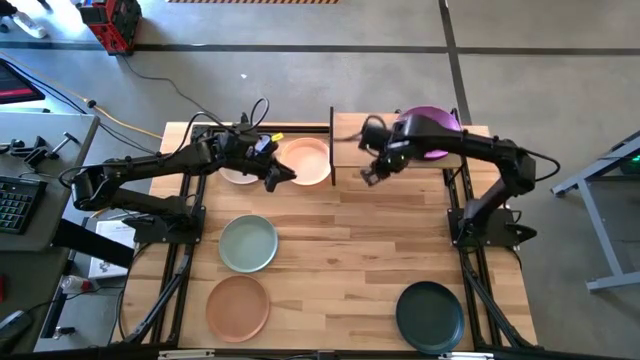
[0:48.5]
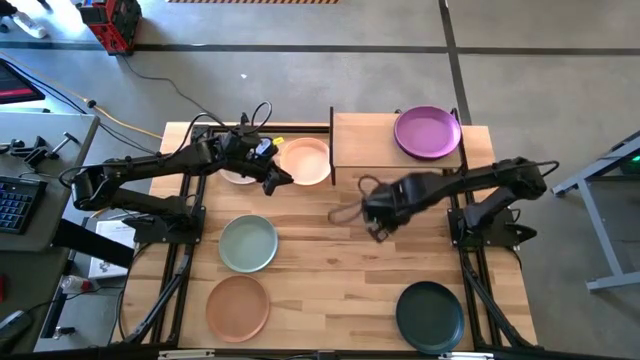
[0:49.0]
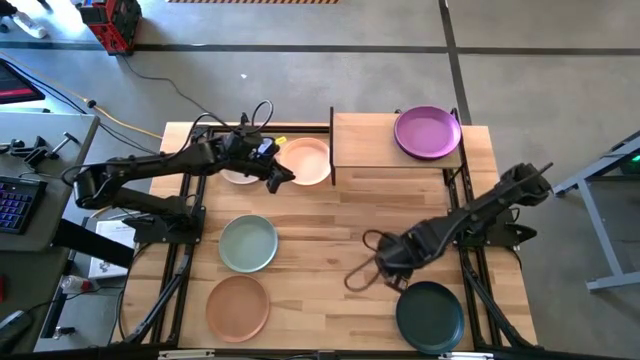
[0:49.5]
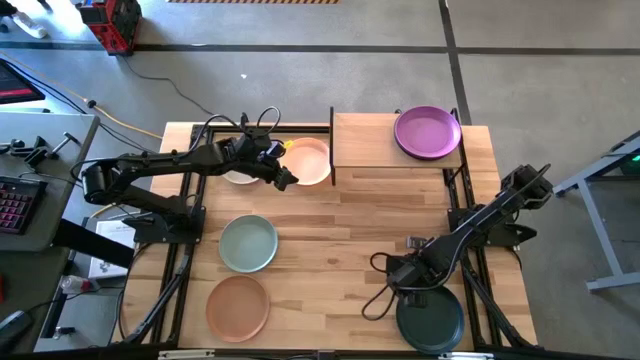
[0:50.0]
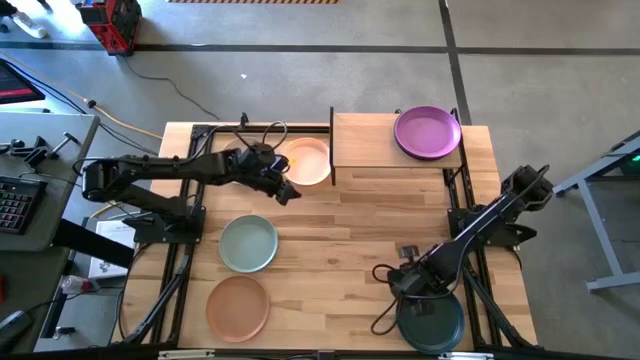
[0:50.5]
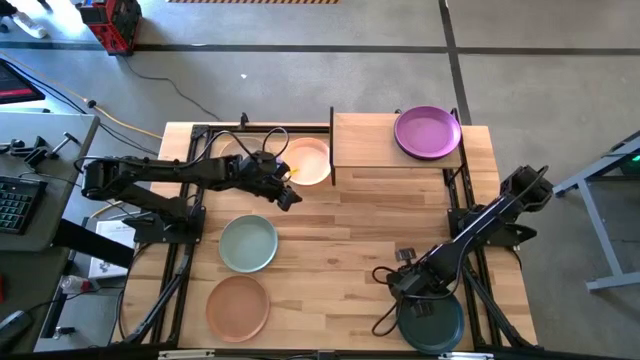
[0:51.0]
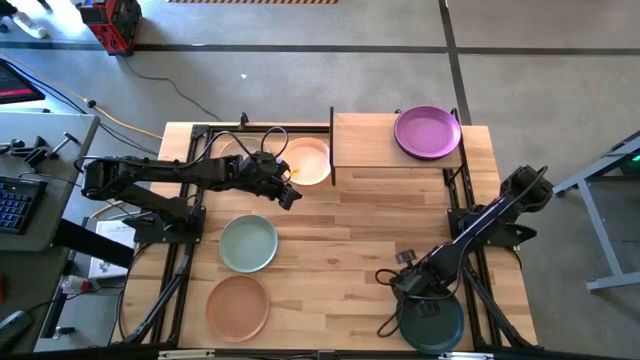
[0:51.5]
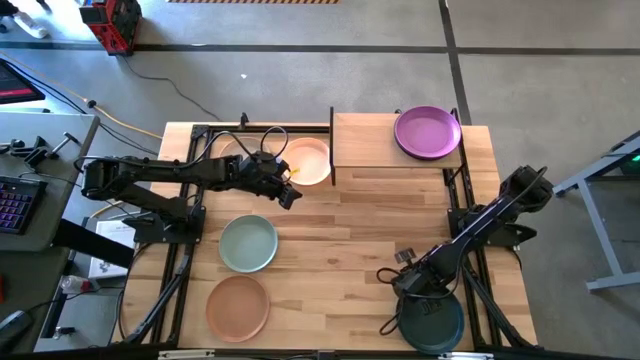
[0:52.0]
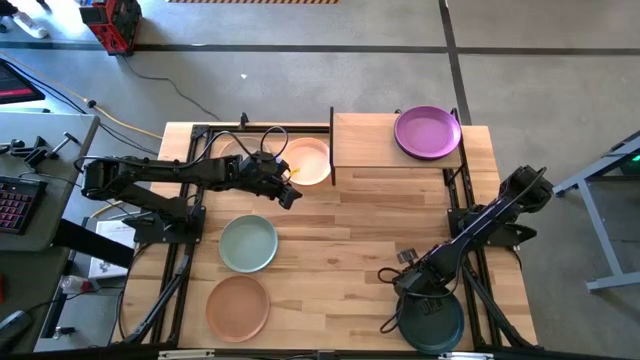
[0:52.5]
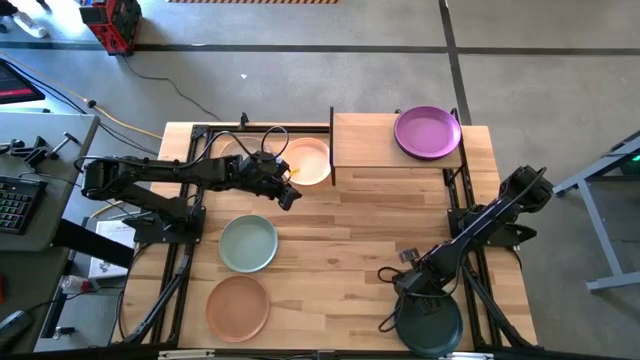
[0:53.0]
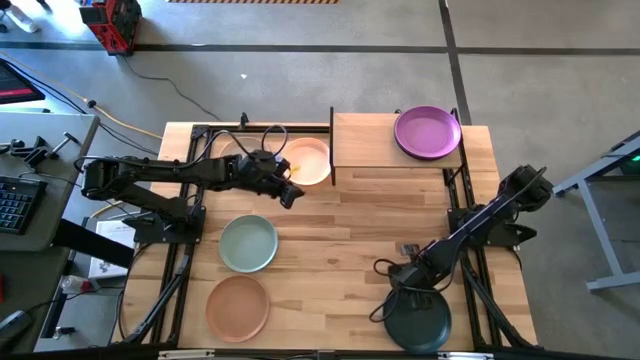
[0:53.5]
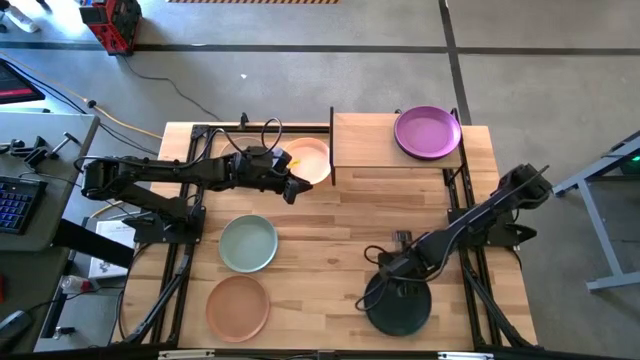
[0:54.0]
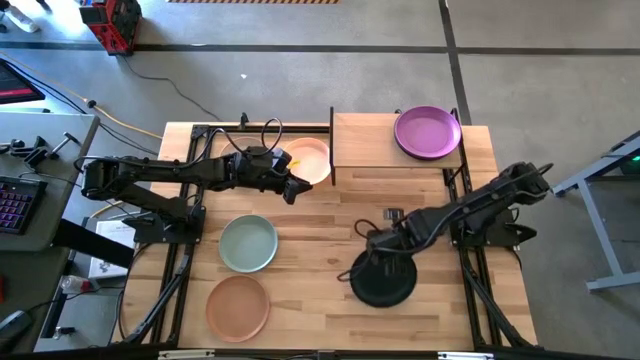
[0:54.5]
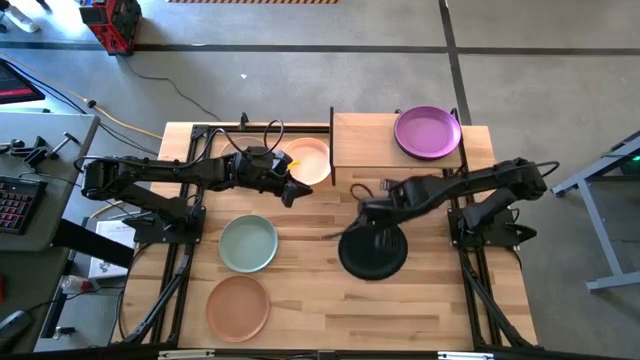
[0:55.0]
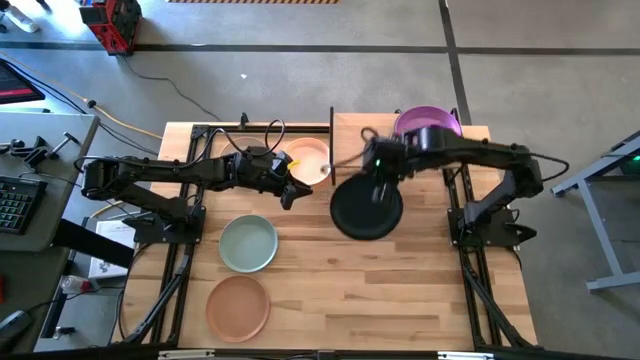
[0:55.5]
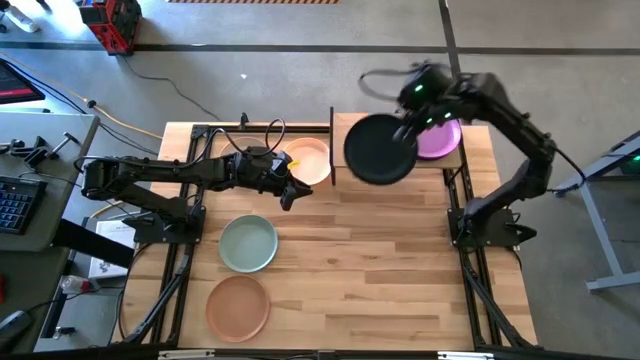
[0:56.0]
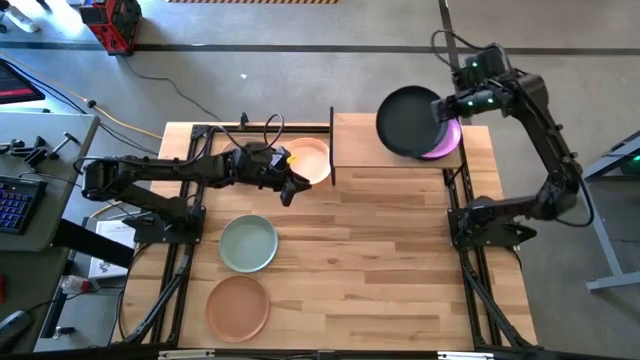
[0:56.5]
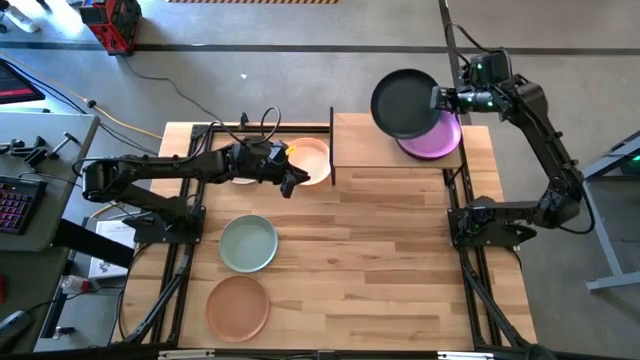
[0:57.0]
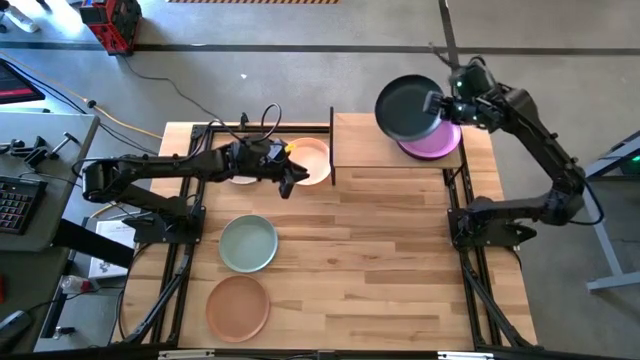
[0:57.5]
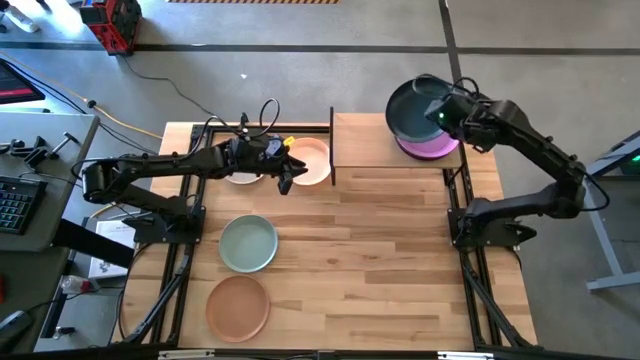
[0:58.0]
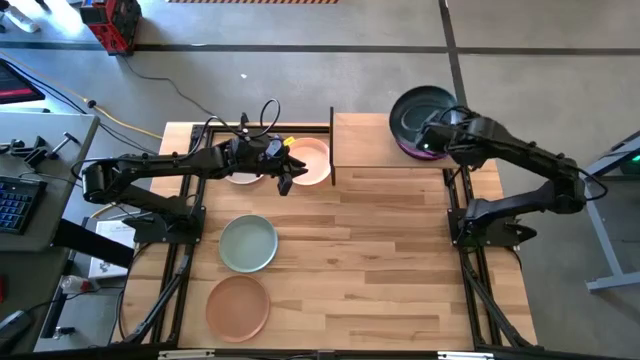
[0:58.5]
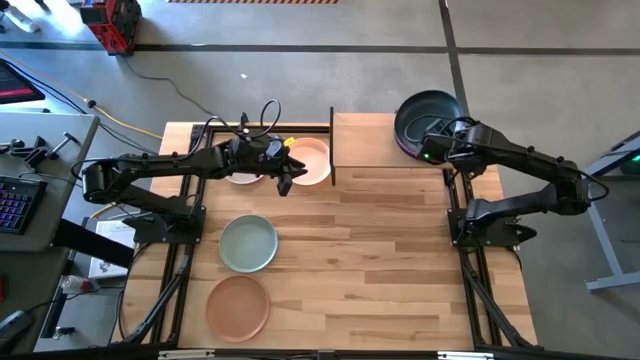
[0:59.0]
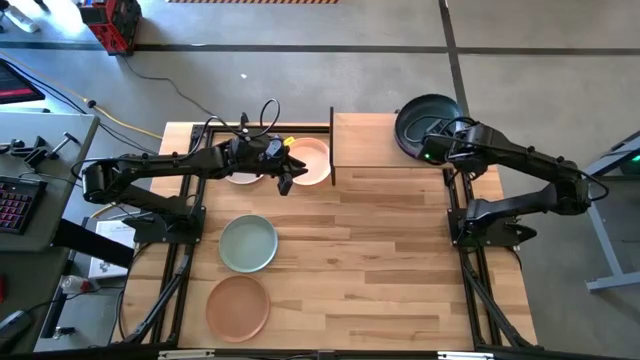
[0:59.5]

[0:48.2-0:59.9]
Task: Place and stack plates onto a shelf
Stack the black plate on top of the violet plate on the shelf

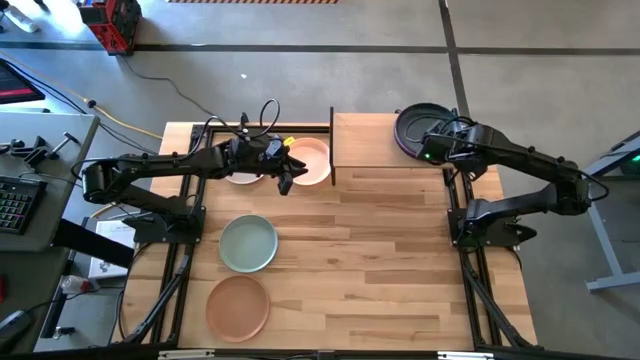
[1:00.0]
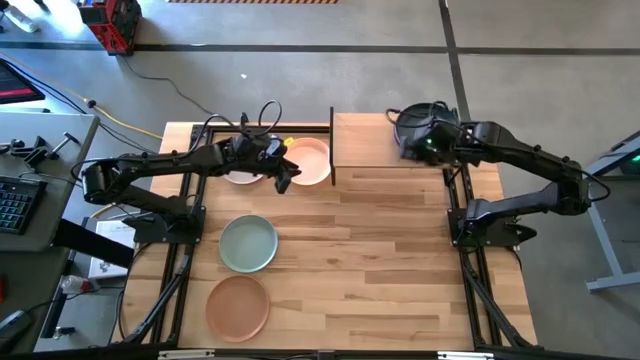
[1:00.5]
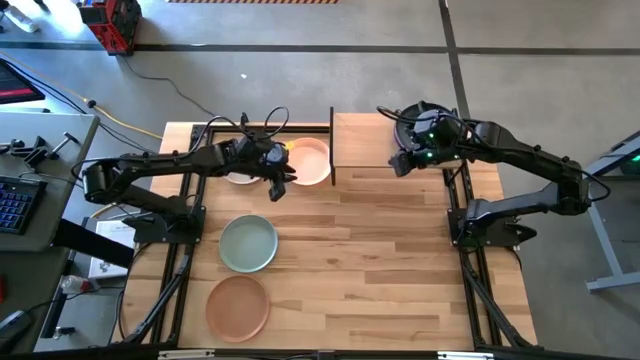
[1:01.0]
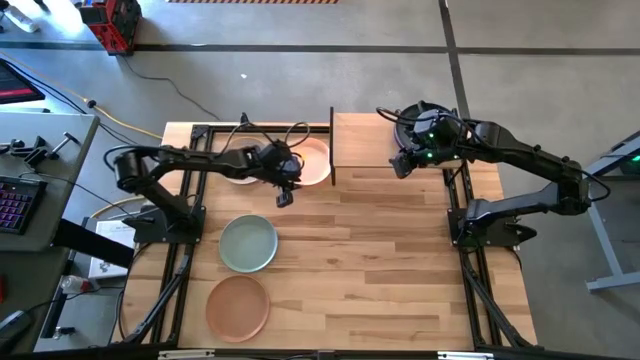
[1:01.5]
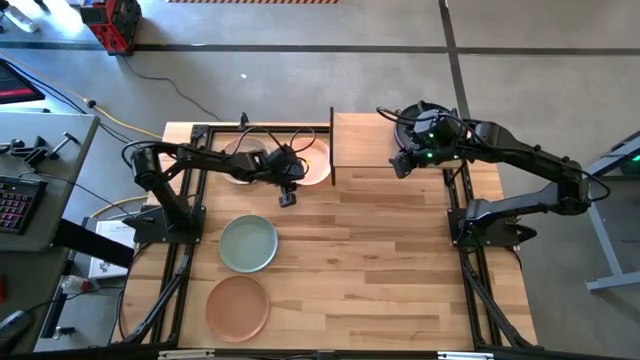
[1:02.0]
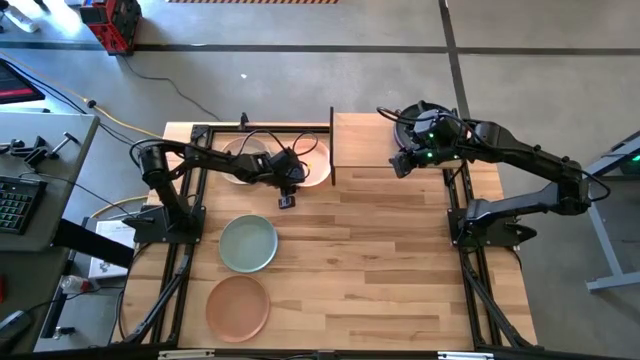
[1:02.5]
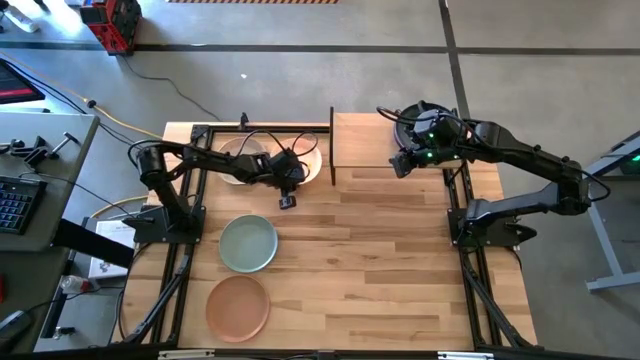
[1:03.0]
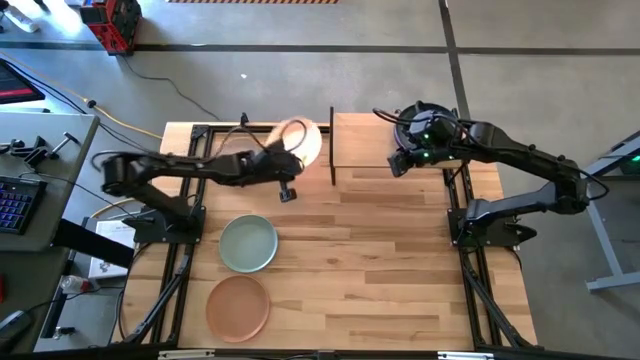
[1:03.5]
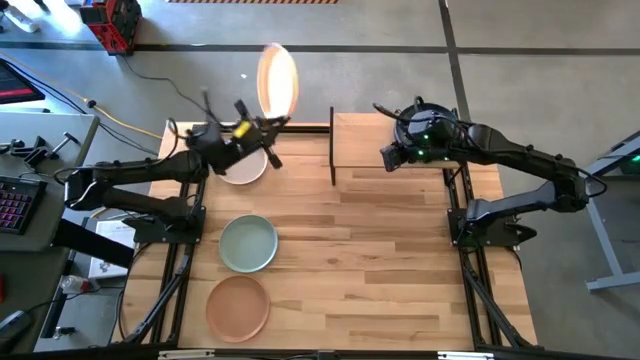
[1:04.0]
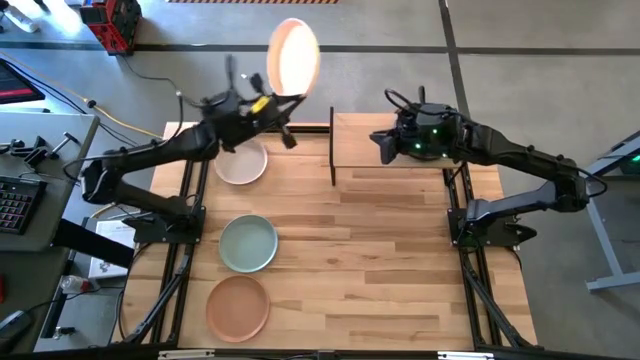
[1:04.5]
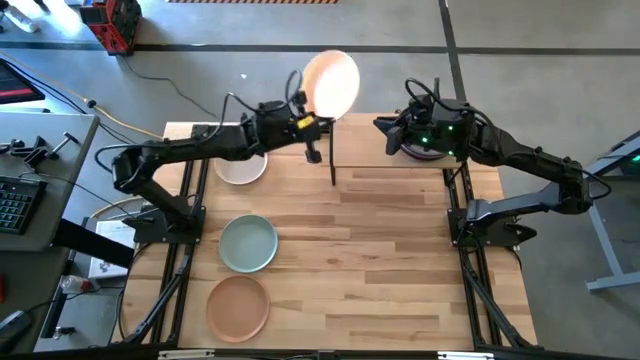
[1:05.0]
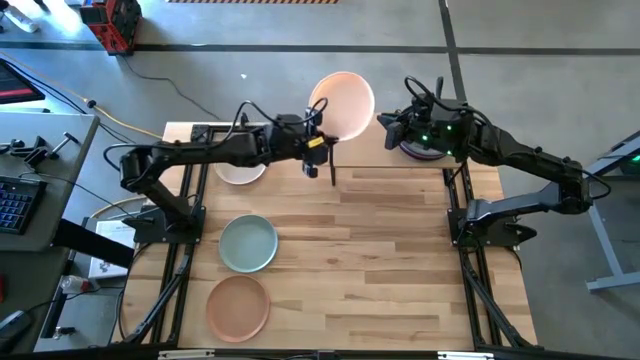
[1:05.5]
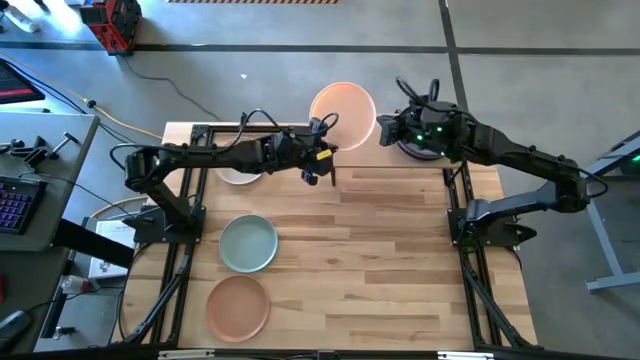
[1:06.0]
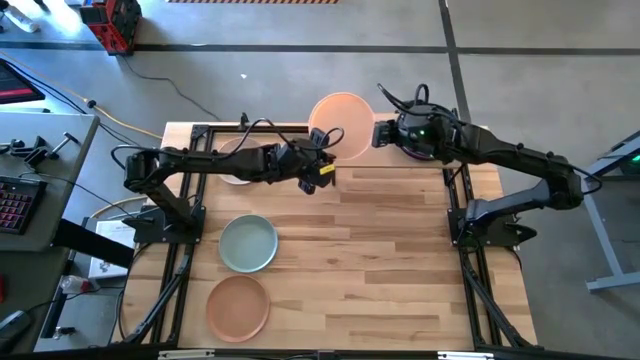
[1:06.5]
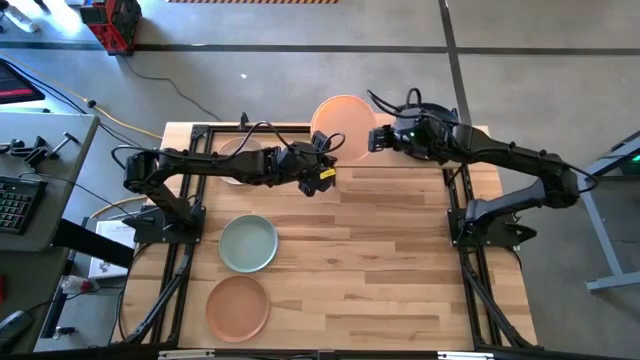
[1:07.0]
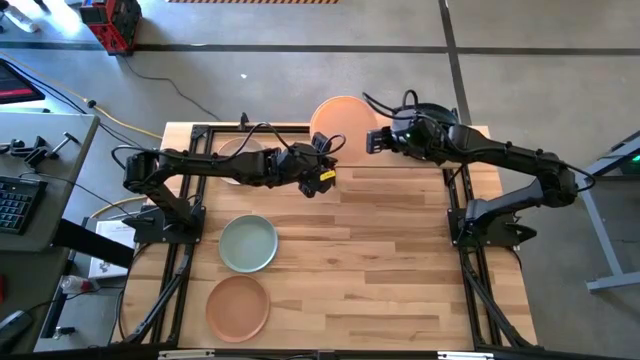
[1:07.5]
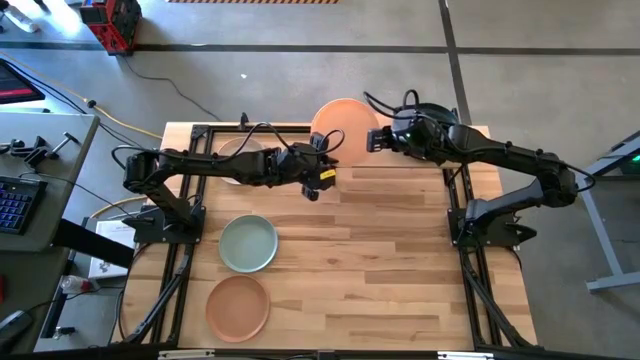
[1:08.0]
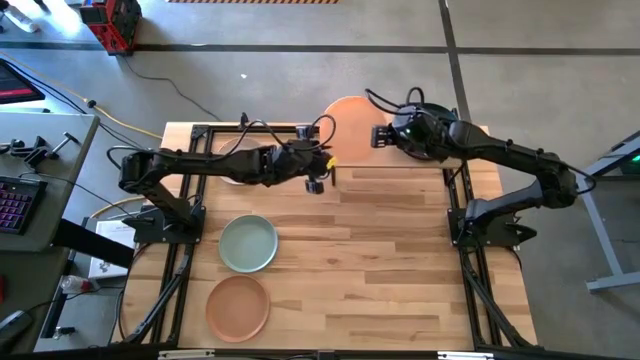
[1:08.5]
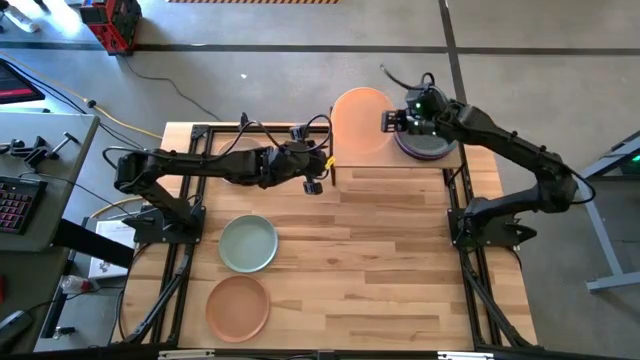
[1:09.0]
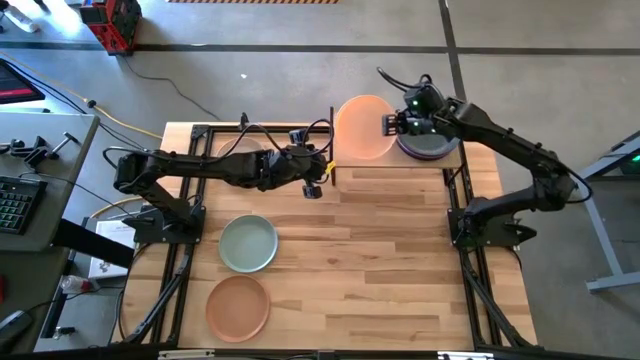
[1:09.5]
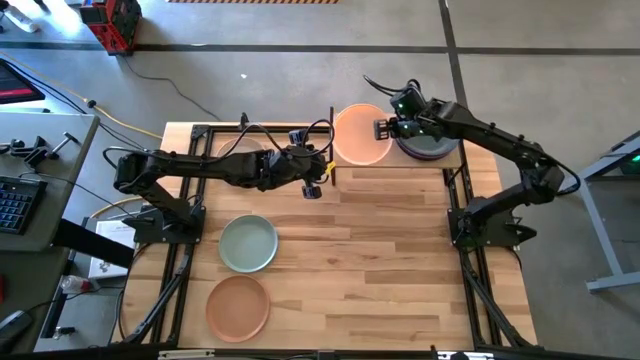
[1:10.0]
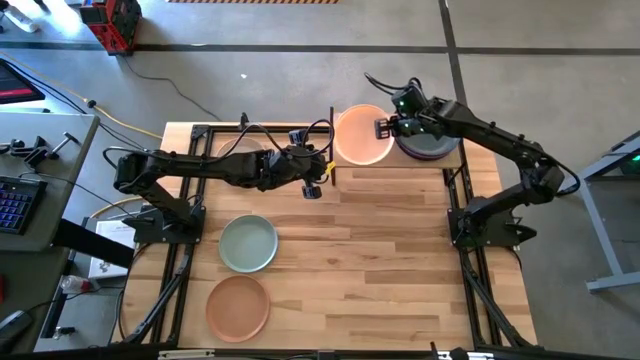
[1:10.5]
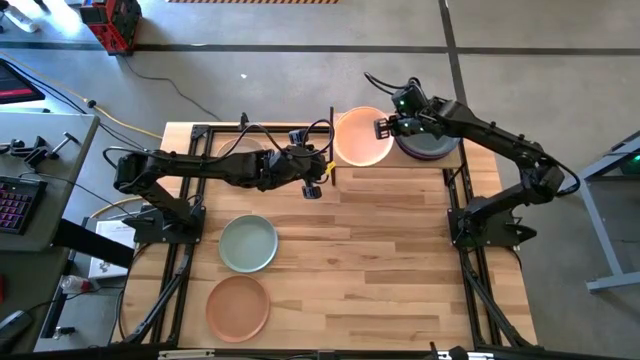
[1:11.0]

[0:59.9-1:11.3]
Put the light brown plate on the shelf
